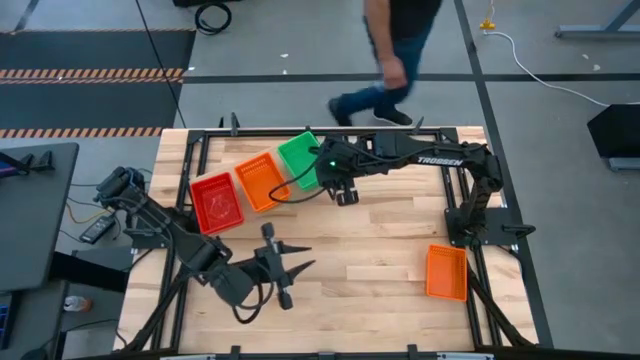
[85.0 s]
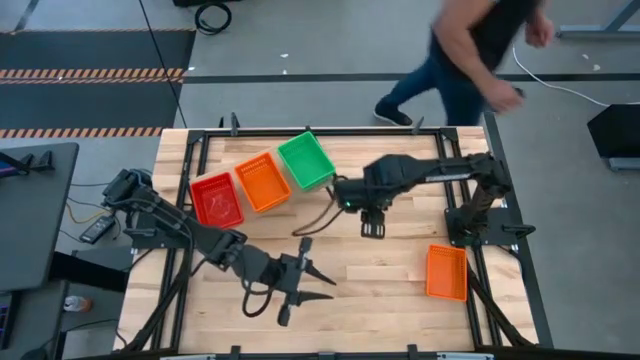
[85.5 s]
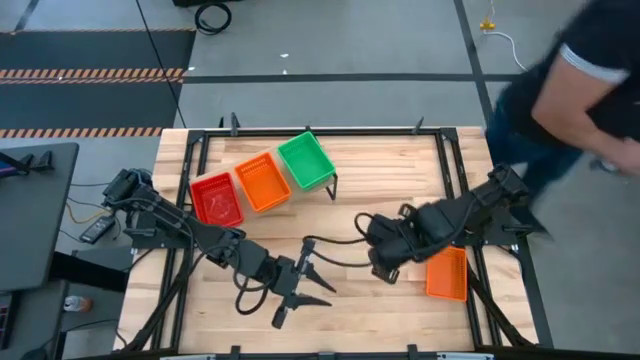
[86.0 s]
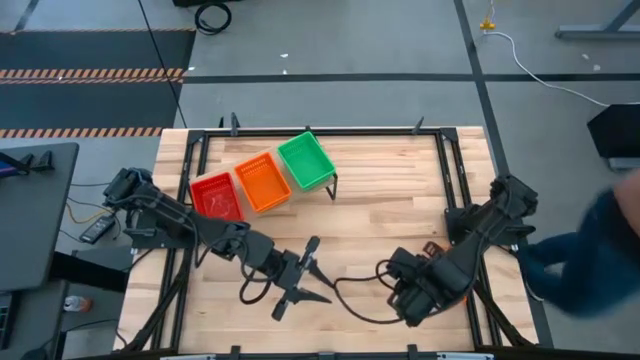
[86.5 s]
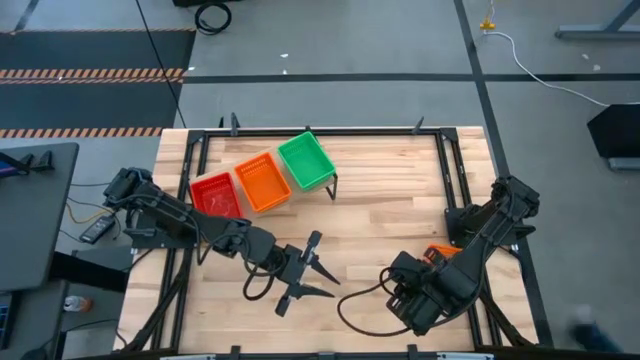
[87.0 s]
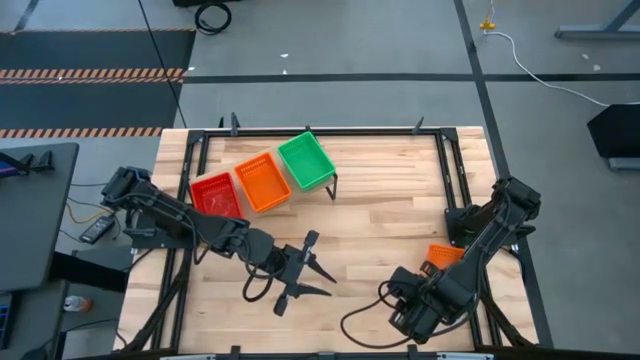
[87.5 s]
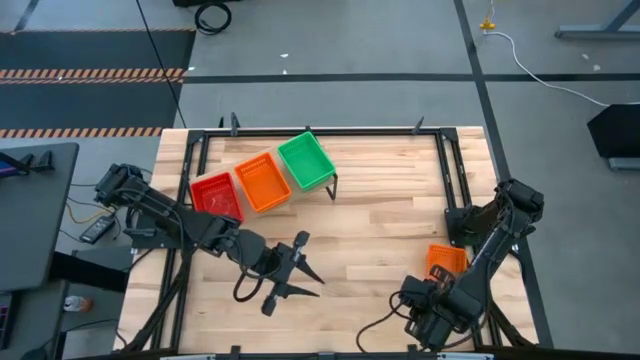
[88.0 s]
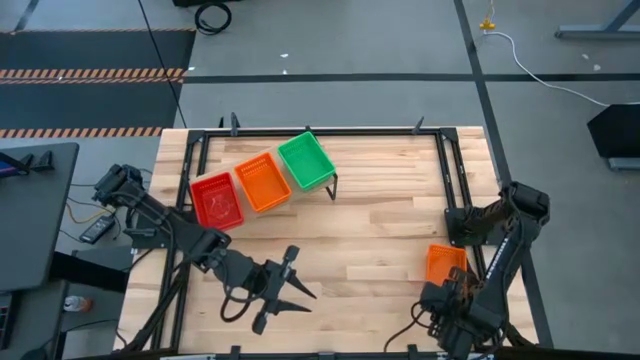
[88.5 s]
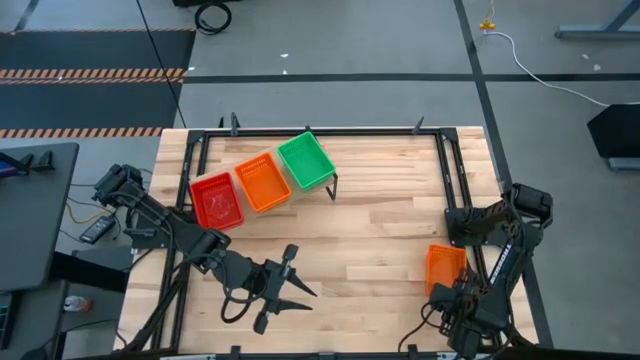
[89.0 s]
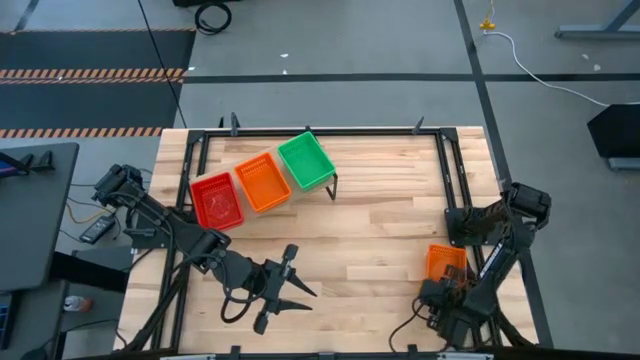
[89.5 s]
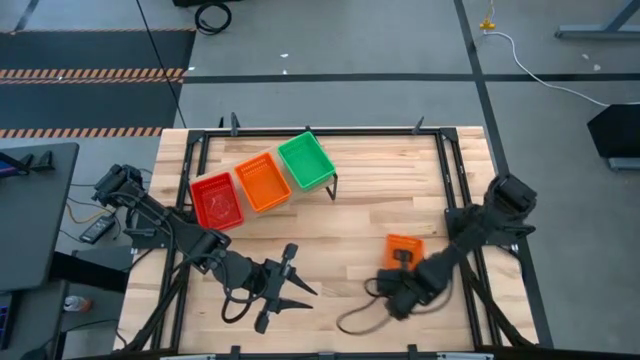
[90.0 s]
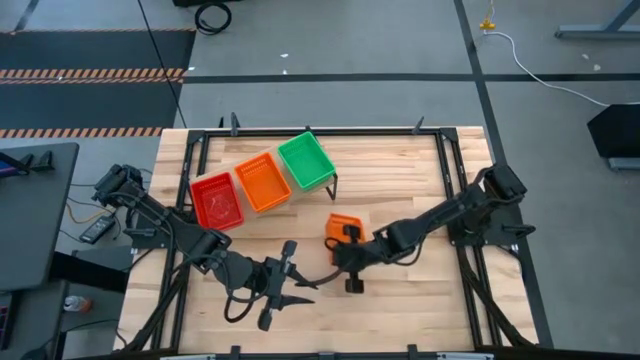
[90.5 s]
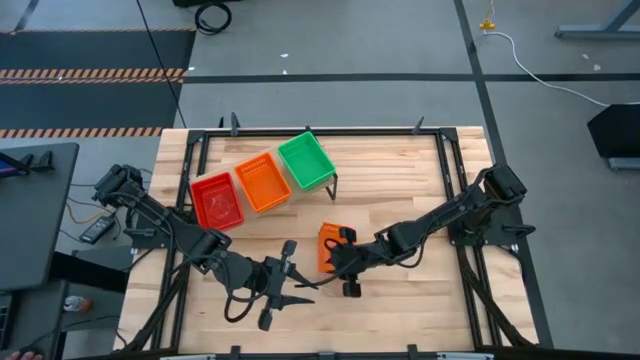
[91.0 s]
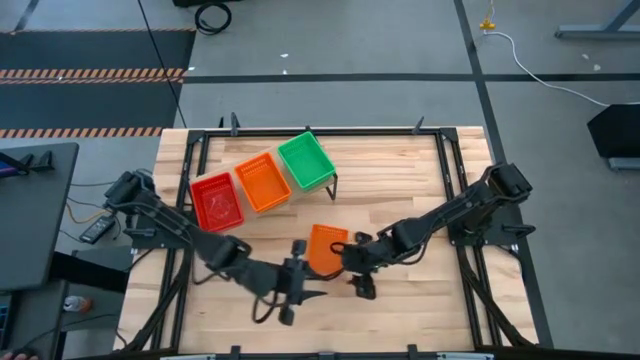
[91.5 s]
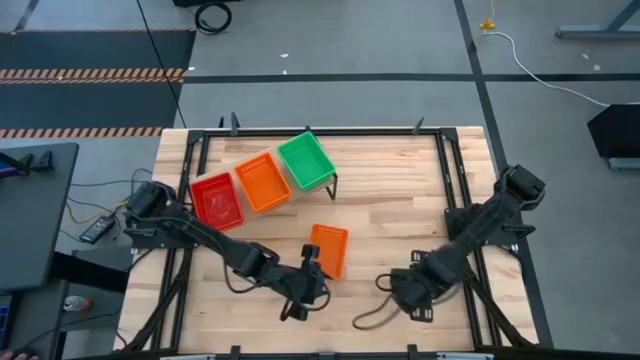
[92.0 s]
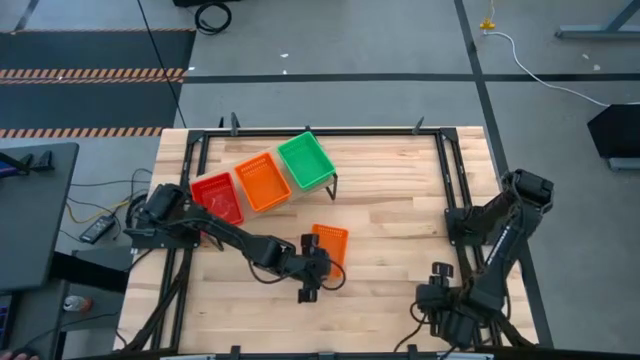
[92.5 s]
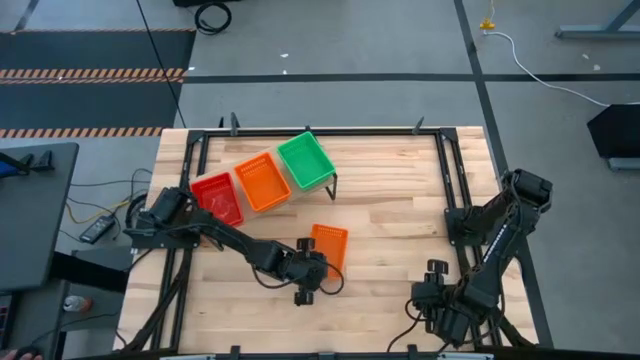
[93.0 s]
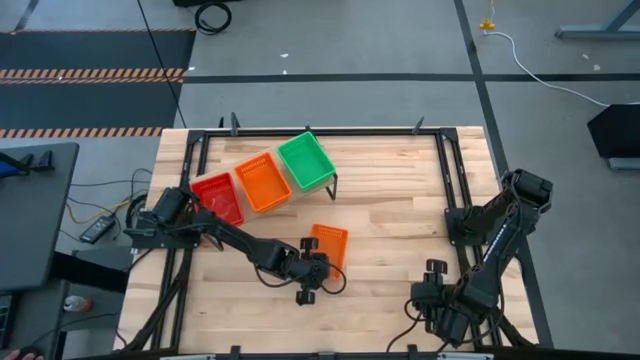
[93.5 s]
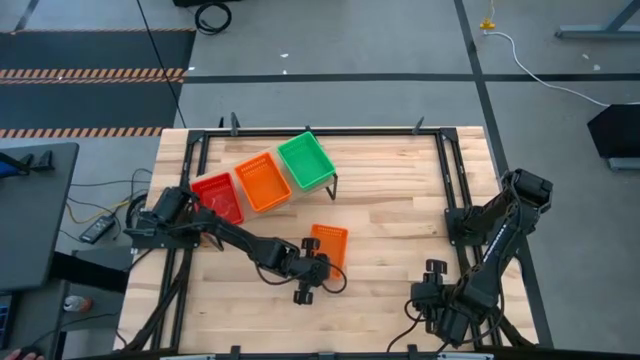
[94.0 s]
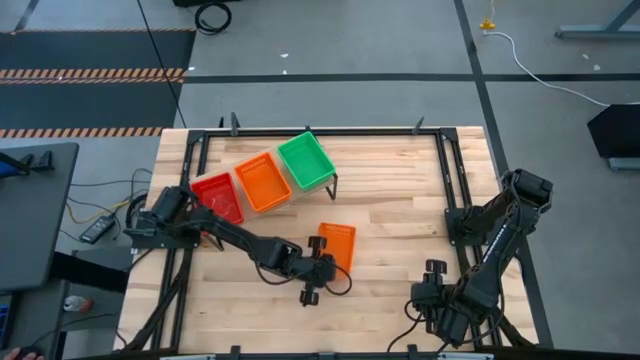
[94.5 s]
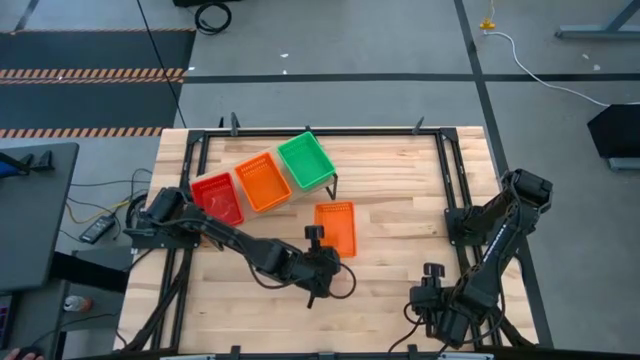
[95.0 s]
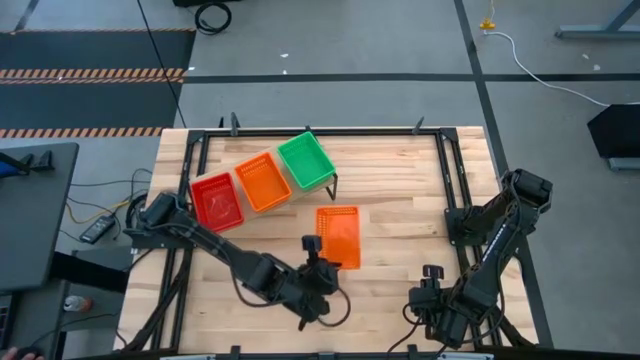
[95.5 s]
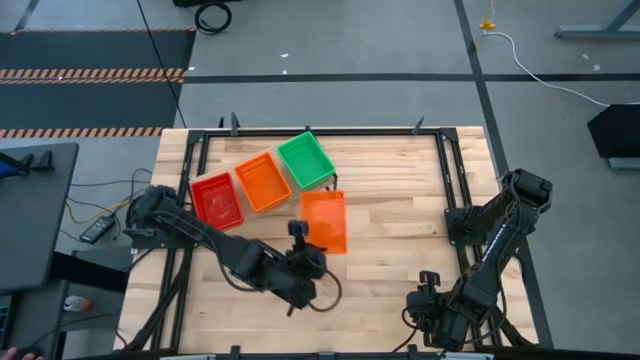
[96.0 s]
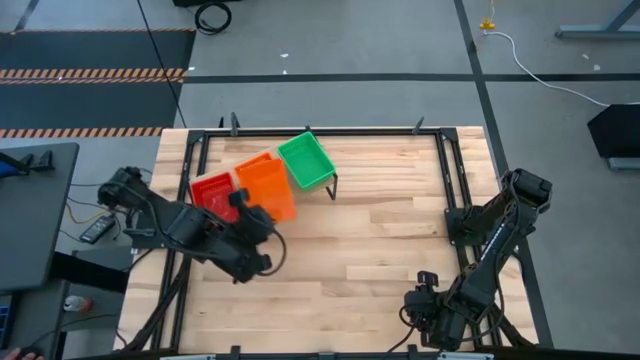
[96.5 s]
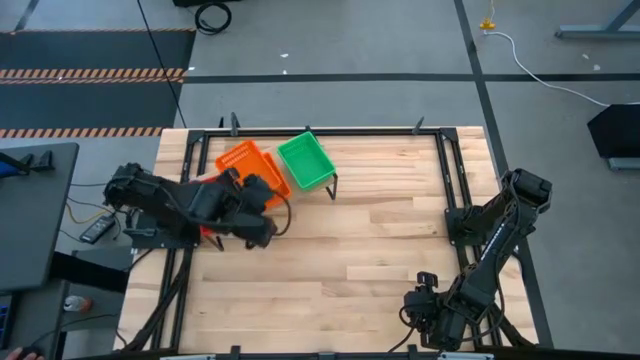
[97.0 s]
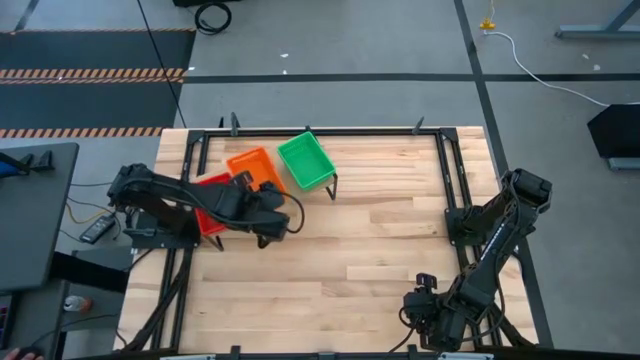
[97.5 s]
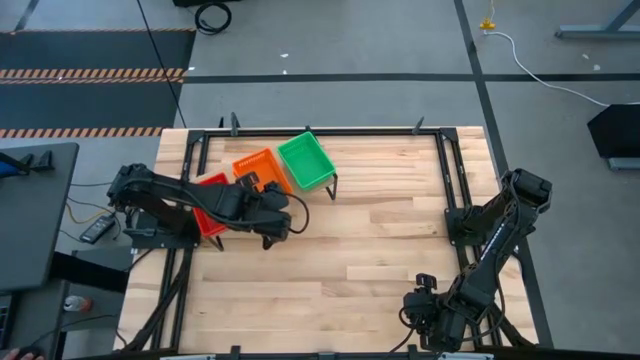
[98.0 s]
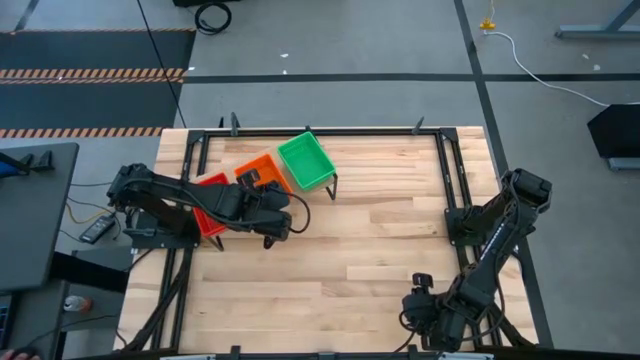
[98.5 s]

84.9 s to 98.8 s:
Task: Stack baskets on shelf by color
Stack the orange bin on the orange bins on the shelf

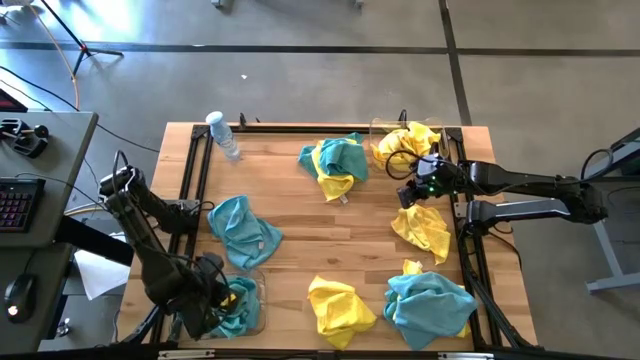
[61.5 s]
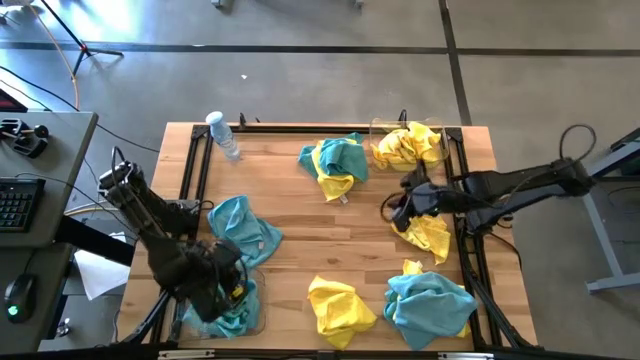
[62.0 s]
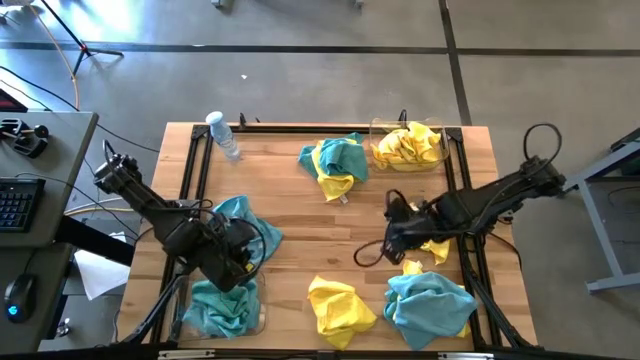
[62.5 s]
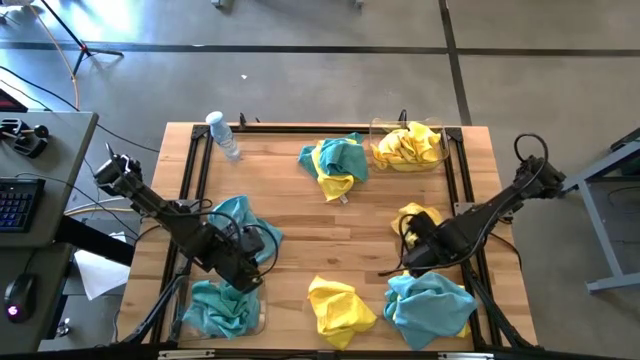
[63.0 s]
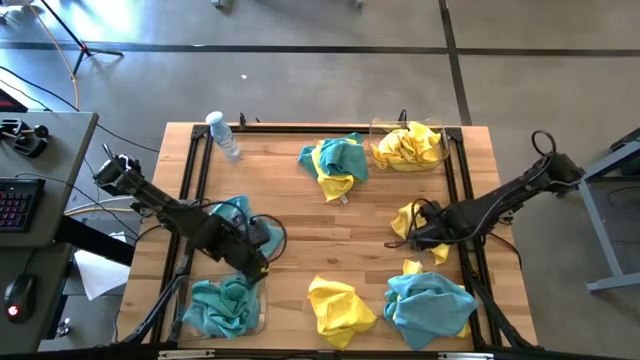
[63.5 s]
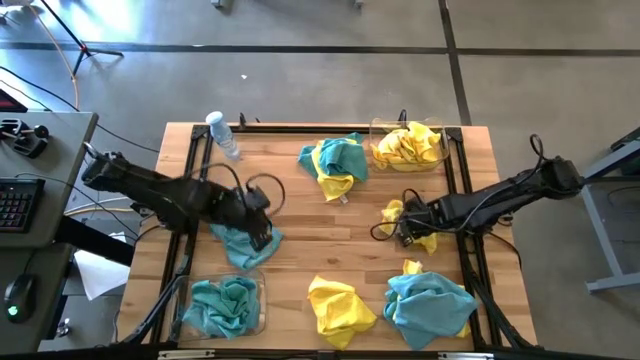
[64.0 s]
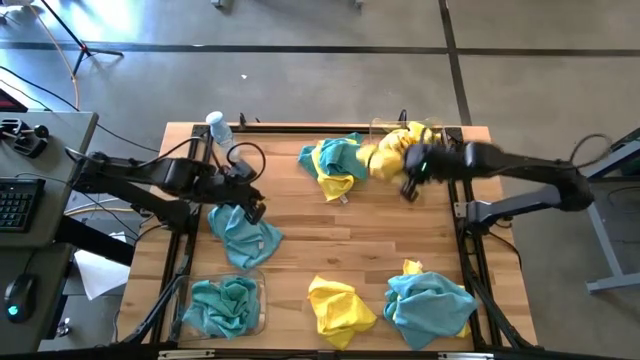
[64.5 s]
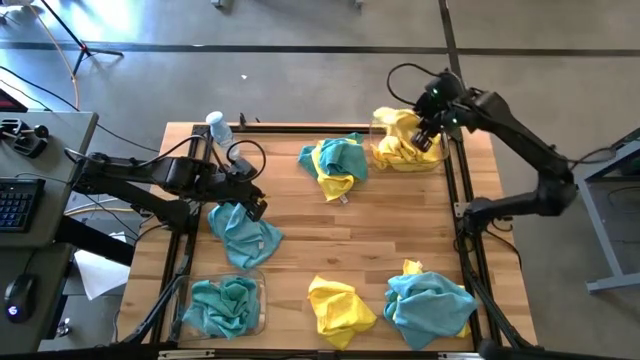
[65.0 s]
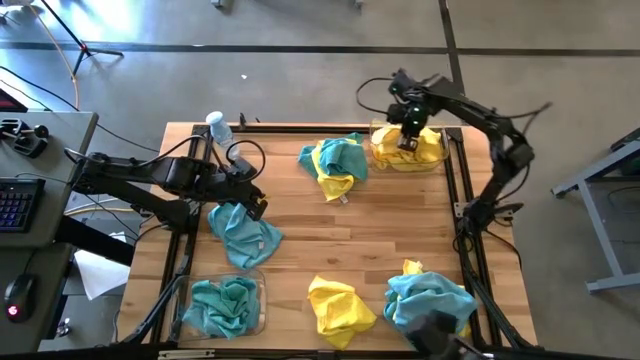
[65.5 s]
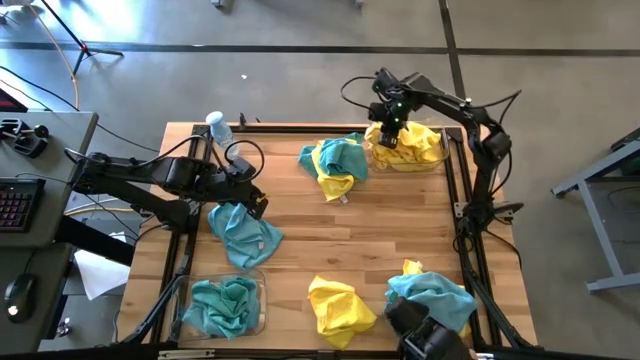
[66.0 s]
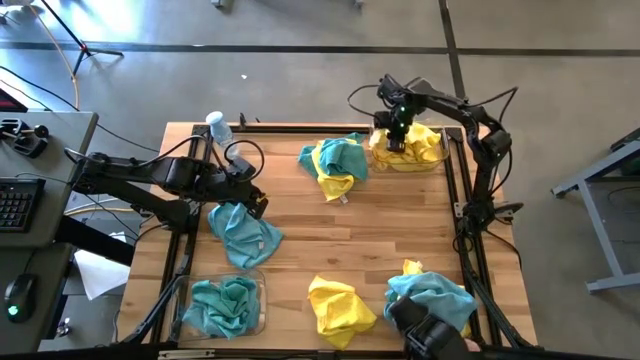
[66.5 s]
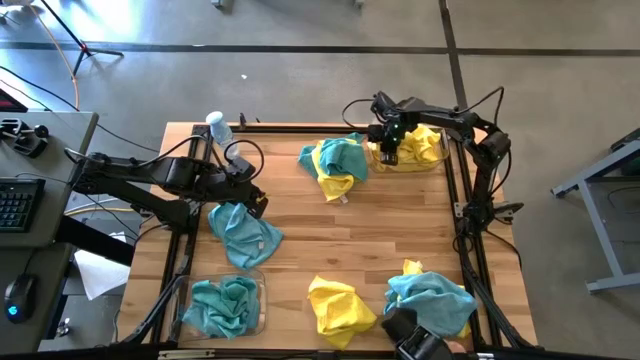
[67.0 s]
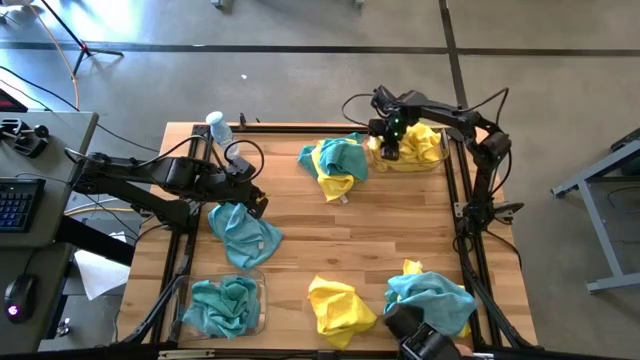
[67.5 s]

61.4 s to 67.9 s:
Task: Sort microfiber towel by color & place in baskets
Put the yellow microfiber towel into the top transparent bin

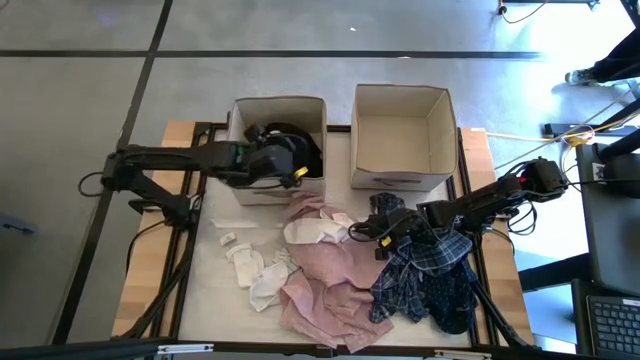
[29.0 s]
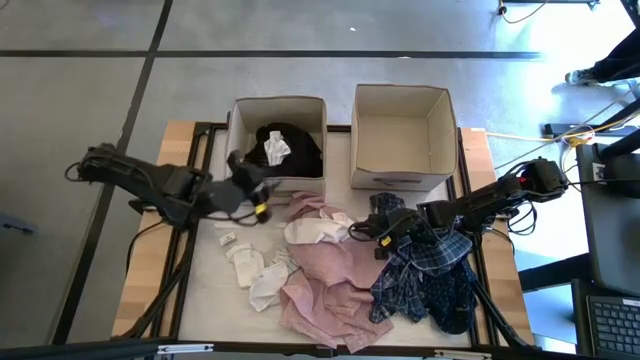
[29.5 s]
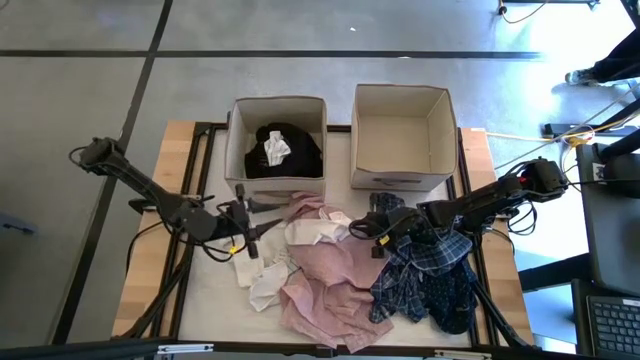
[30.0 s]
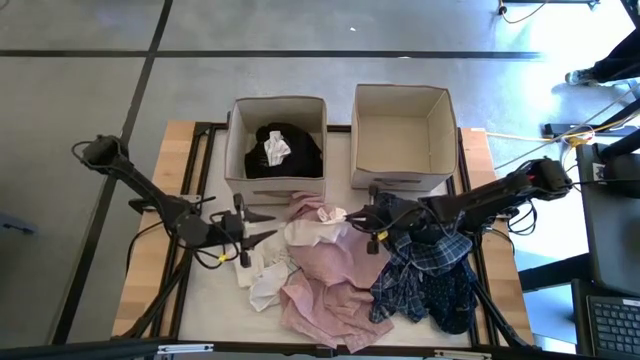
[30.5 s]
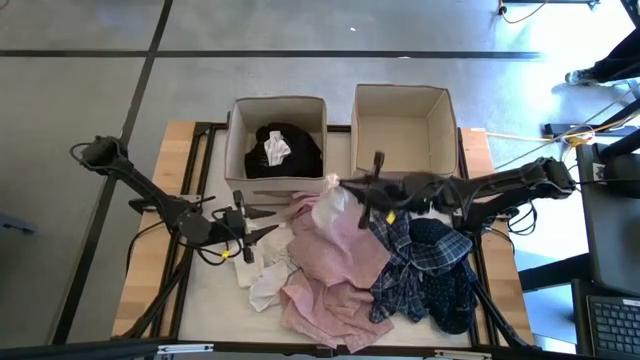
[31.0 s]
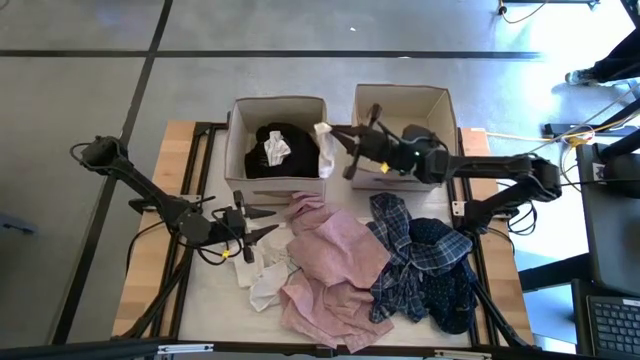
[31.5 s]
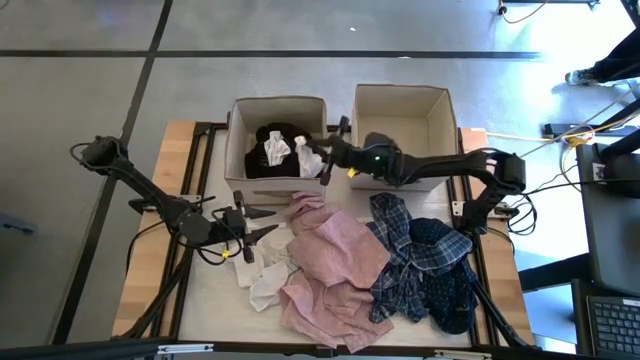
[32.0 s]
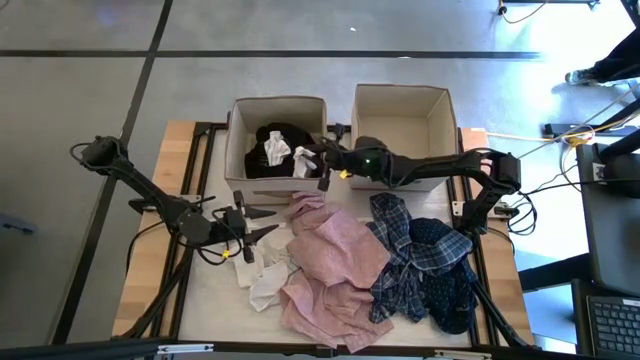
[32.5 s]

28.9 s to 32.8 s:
Task: Sort clothes
Put the right white sock into the left laundry organizer
